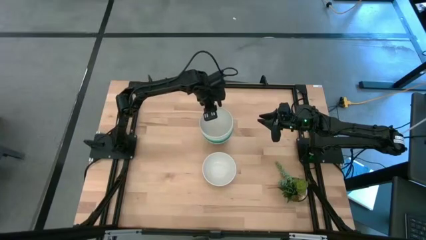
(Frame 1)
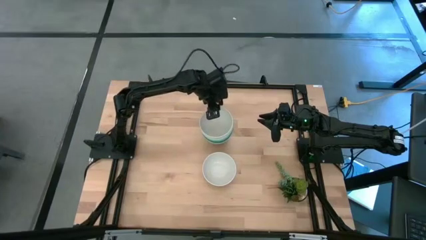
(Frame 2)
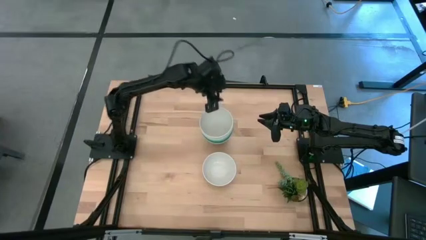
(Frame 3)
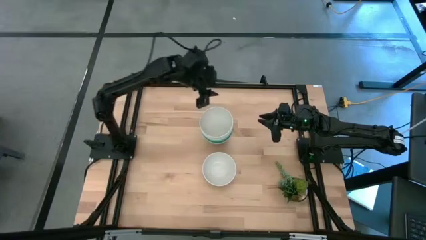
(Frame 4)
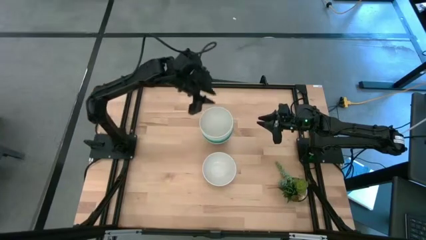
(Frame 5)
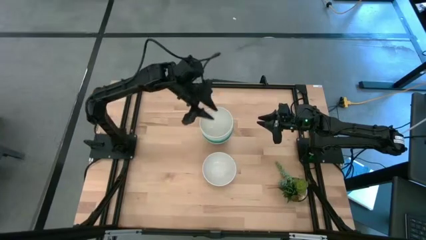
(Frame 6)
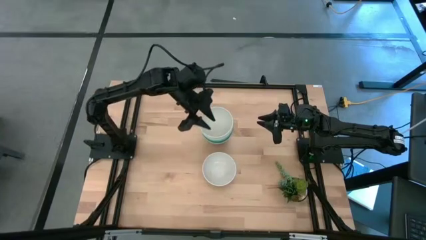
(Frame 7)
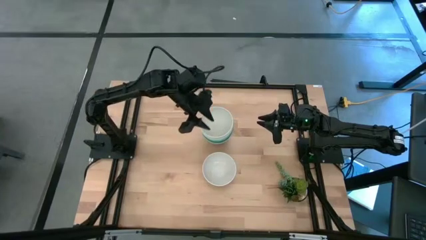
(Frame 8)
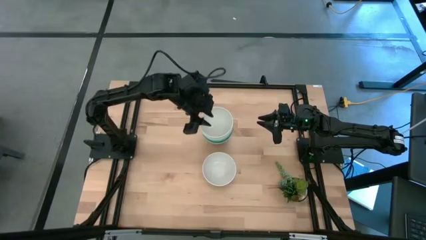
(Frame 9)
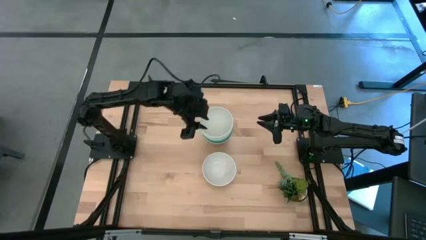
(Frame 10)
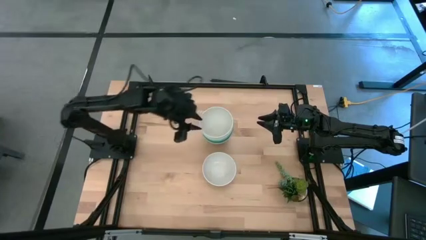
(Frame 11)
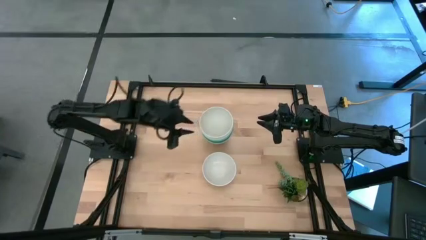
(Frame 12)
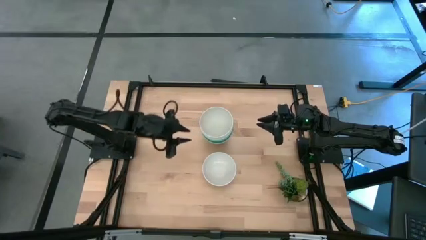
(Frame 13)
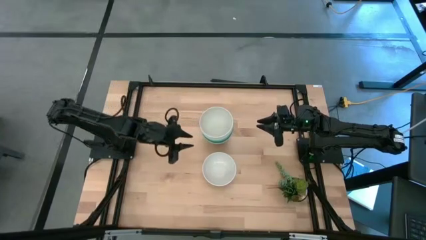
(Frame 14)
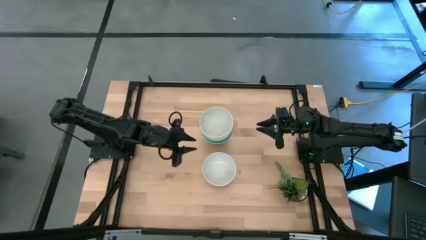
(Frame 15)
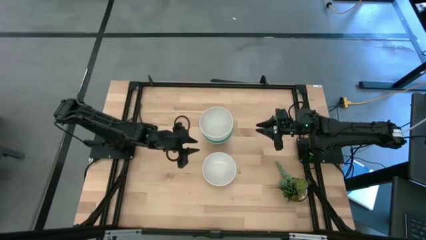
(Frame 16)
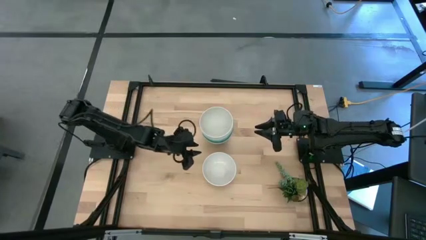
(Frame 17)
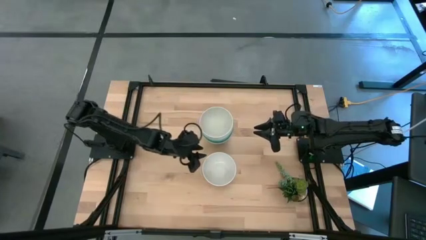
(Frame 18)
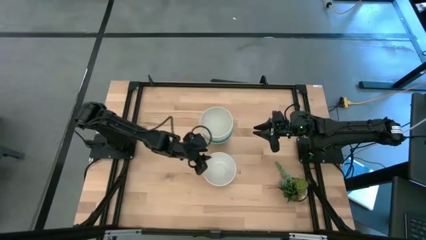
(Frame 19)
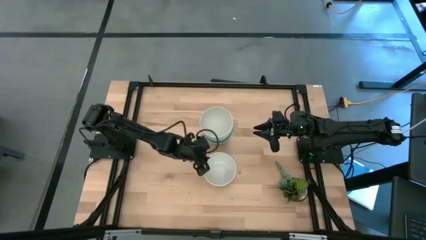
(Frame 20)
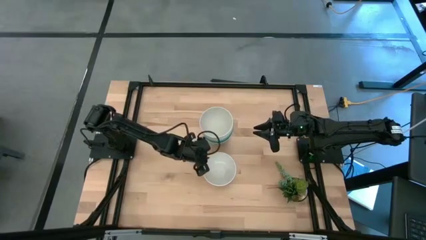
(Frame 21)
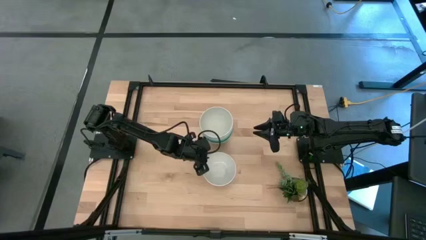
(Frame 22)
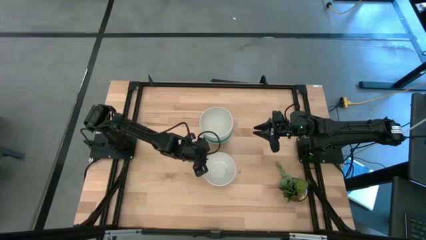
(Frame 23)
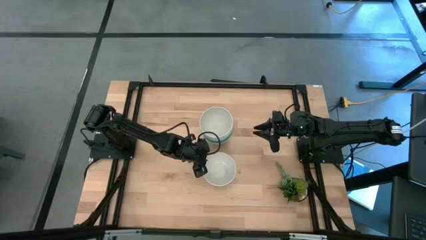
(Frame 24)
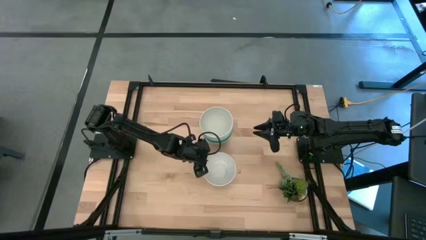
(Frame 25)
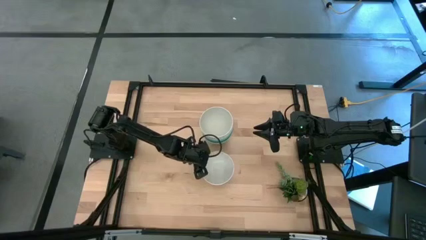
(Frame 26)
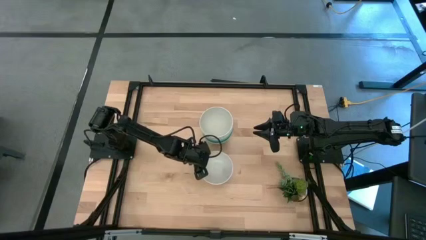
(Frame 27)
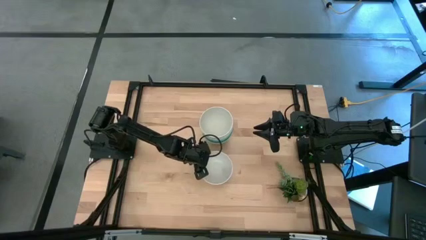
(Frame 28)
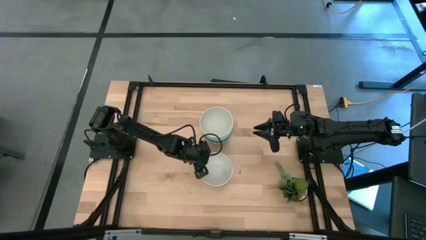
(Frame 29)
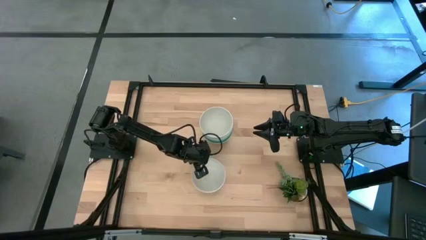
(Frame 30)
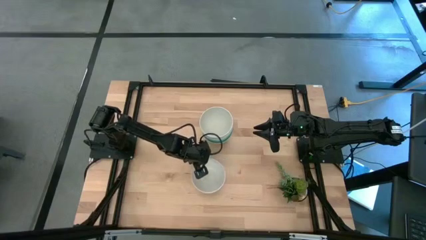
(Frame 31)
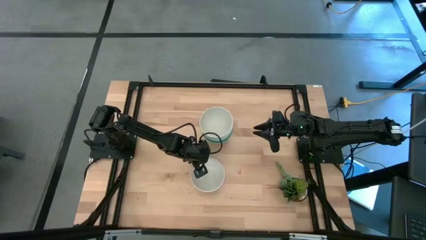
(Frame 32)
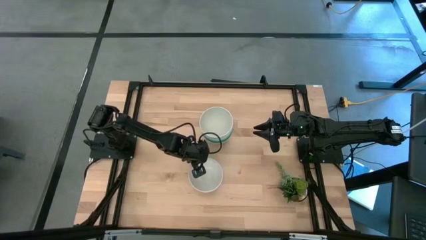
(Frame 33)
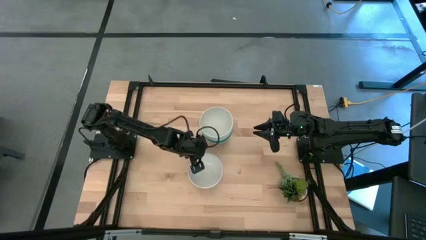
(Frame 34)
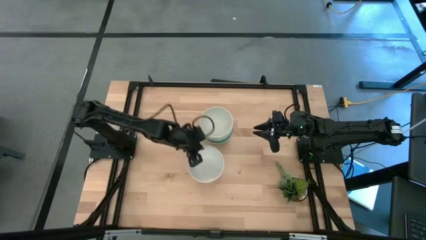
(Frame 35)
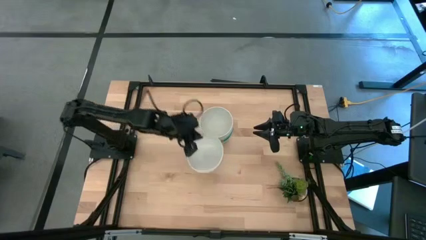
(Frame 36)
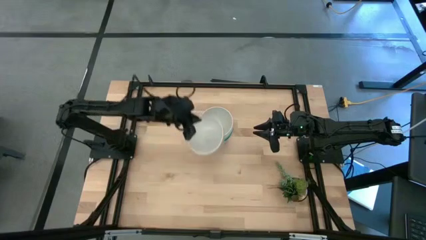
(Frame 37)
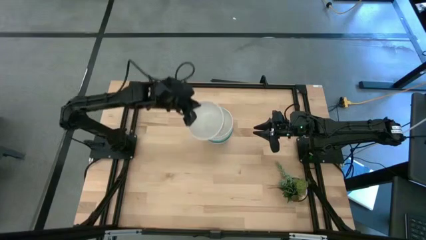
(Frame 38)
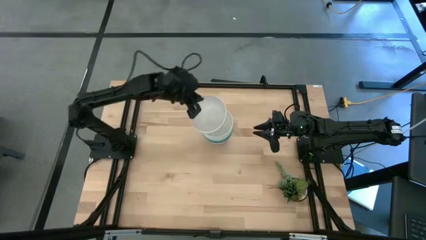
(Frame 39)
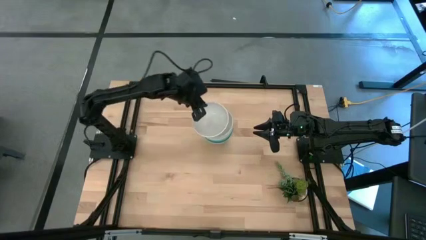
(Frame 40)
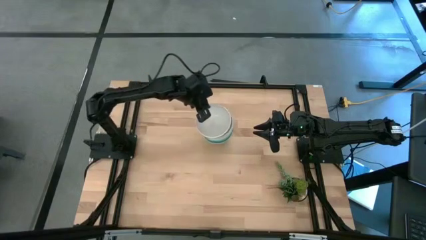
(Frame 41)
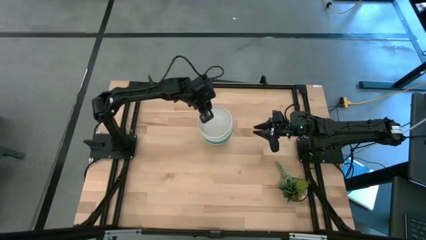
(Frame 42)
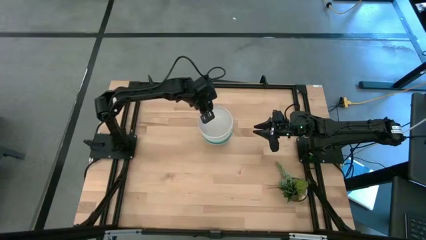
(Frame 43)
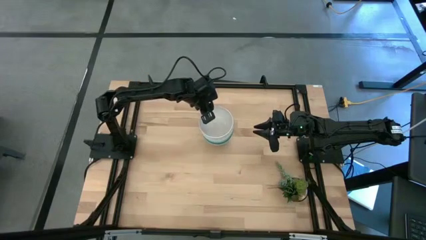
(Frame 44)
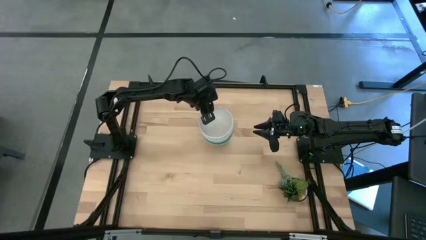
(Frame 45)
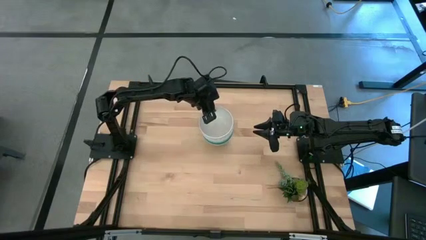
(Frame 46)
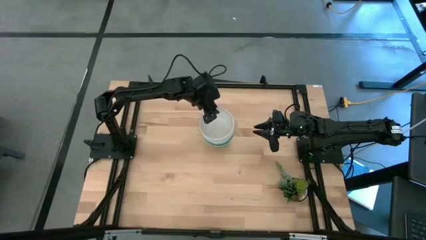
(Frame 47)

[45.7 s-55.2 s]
Task: Nest bowls inside each other
Stack the white bowl on the other white bowl

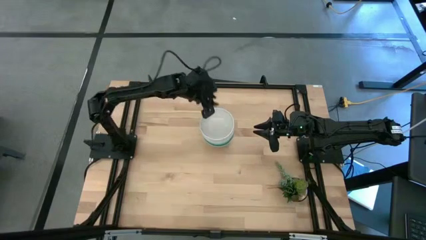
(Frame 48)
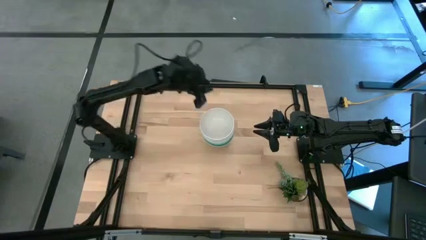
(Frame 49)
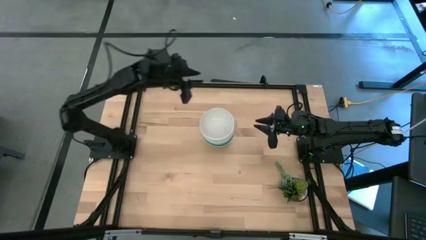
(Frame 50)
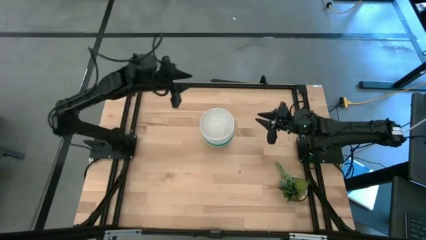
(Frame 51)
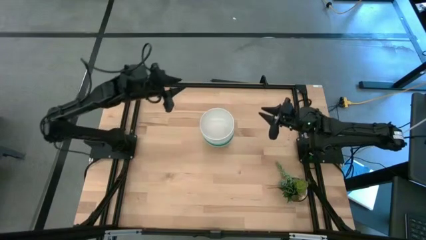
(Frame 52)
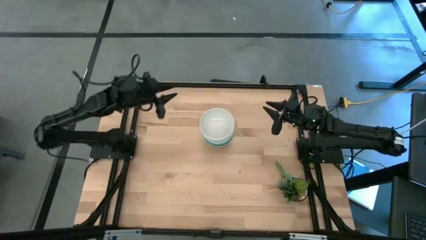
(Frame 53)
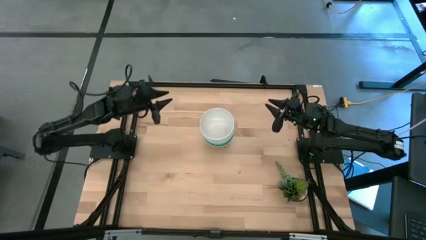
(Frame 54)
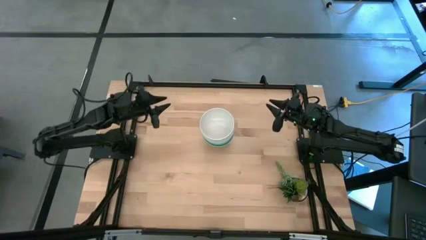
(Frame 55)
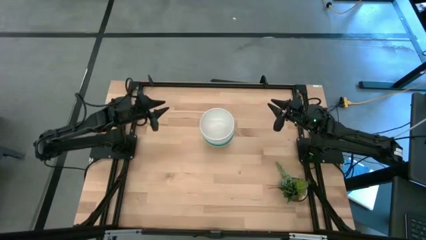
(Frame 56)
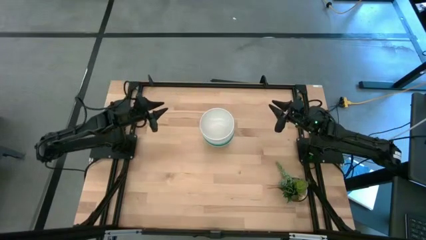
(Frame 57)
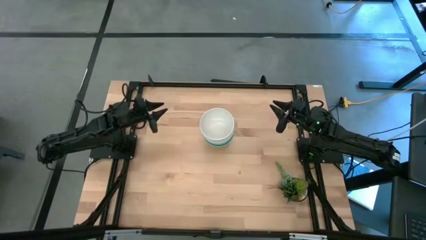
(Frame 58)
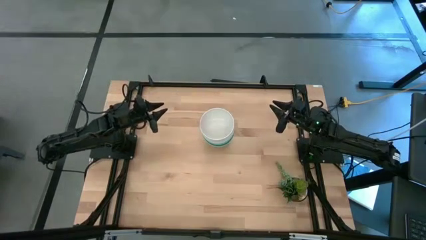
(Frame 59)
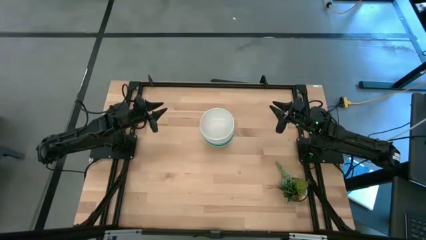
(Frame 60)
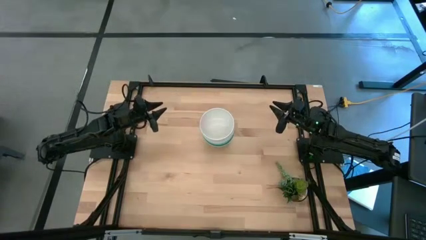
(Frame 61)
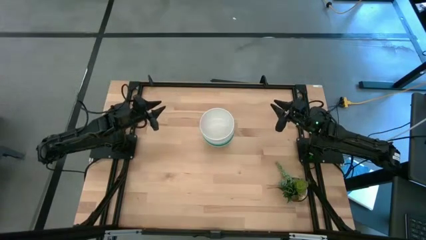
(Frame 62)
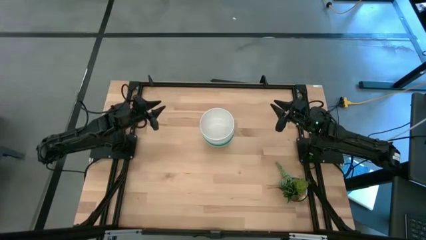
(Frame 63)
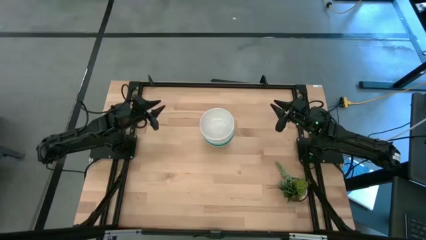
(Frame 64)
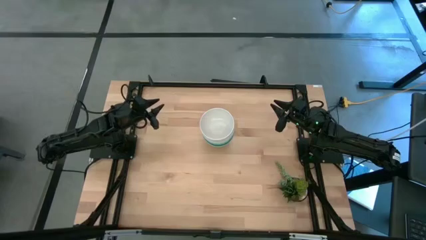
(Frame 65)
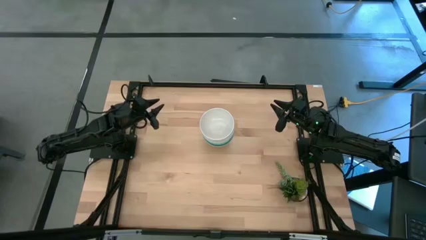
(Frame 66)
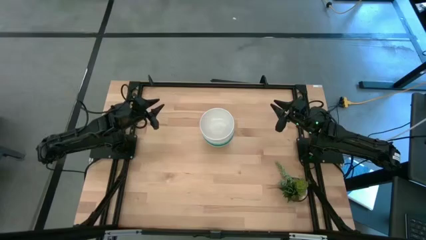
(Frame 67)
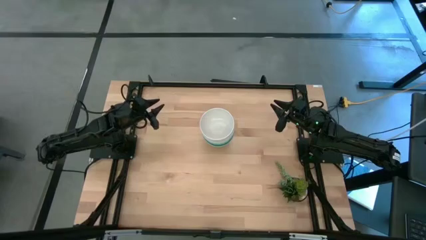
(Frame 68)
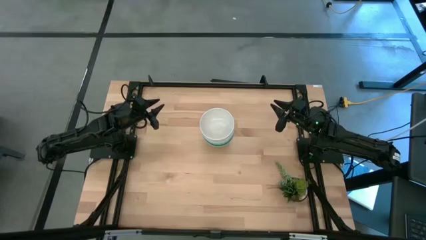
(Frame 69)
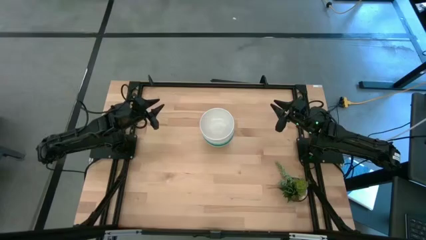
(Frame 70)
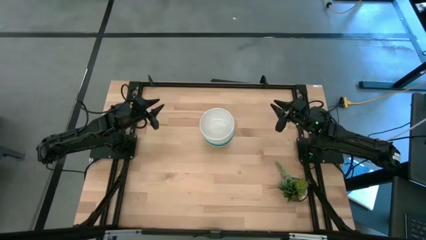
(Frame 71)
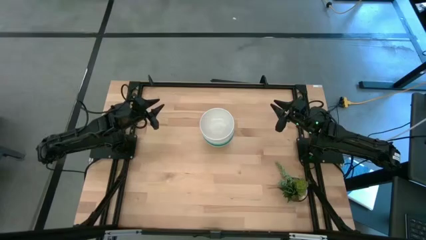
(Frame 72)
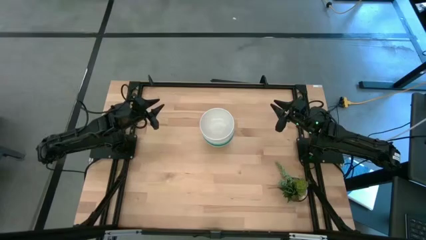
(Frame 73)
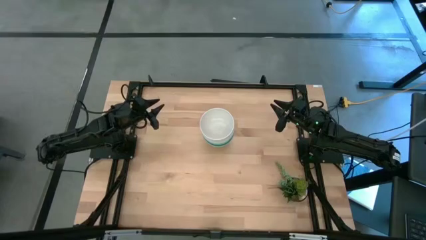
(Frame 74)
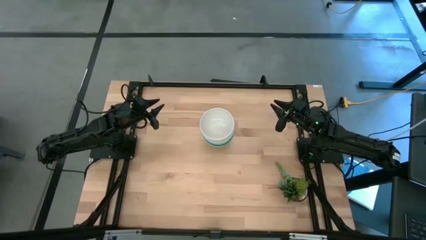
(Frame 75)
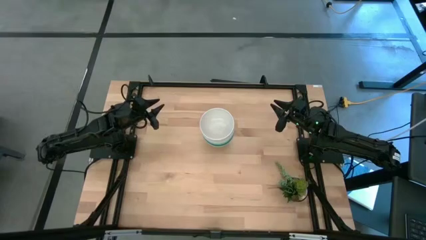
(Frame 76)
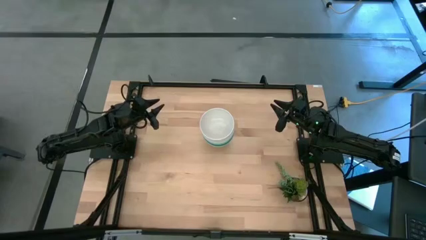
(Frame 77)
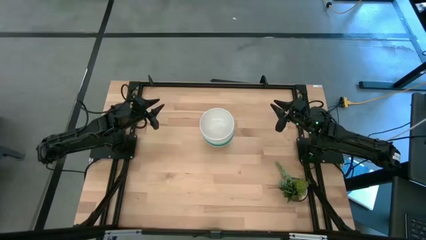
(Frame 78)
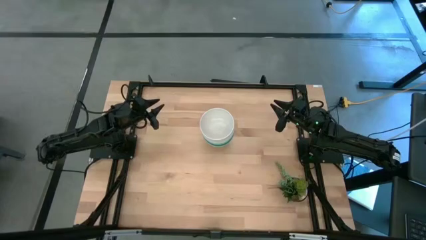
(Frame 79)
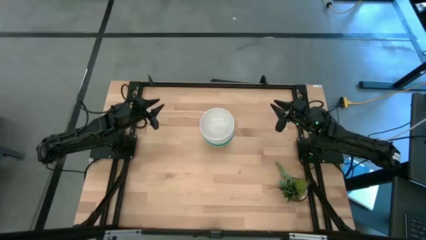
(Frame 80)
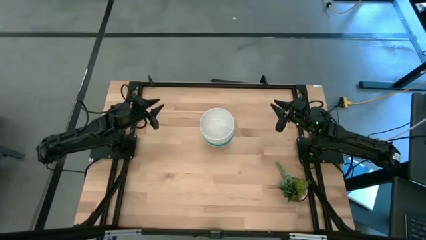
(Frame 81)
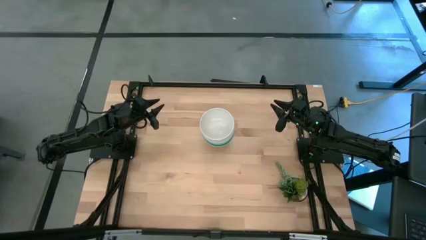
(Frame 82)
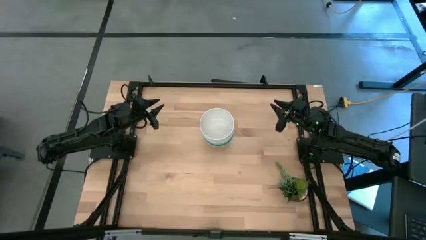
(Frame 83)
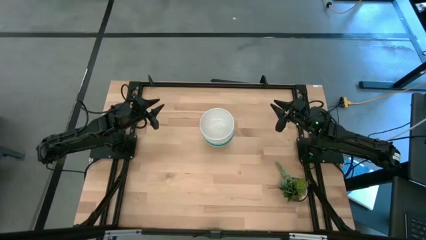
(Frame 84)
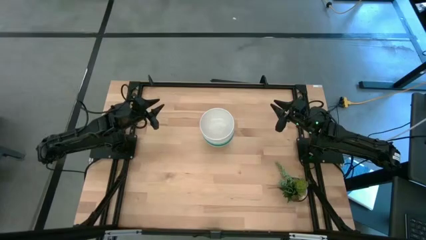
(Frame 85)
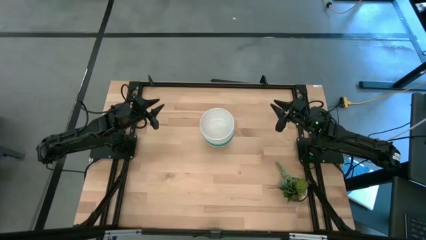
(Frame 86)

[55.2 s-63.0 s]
Return to Home Position
